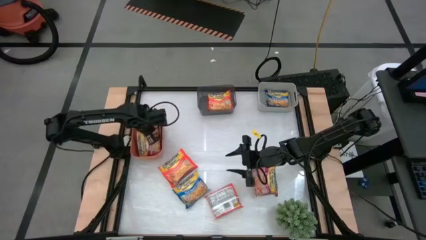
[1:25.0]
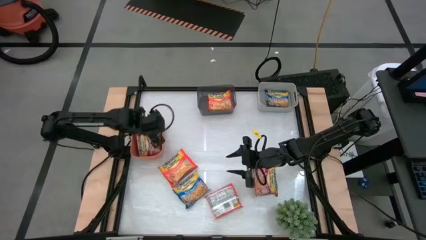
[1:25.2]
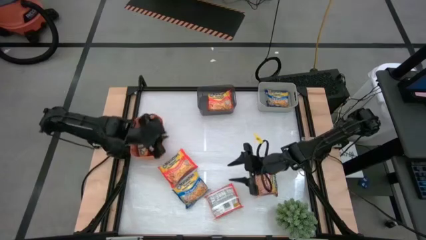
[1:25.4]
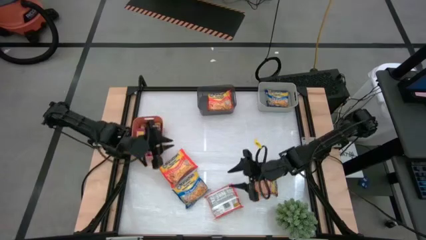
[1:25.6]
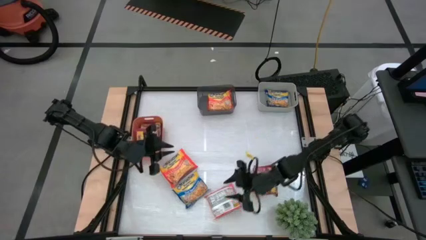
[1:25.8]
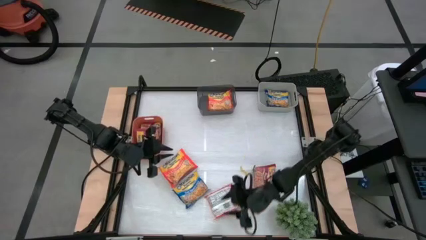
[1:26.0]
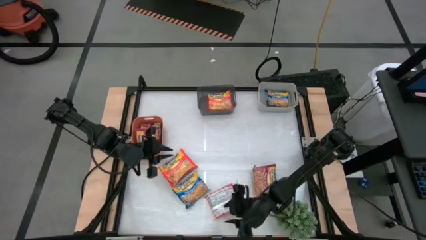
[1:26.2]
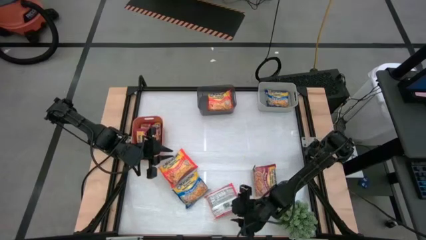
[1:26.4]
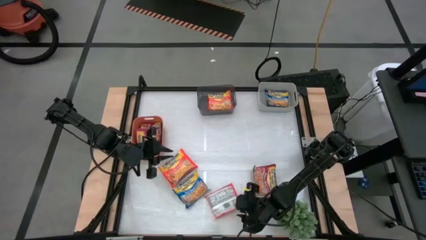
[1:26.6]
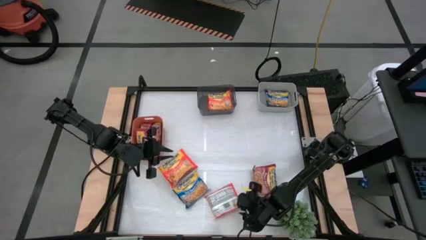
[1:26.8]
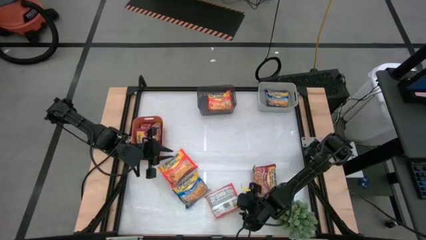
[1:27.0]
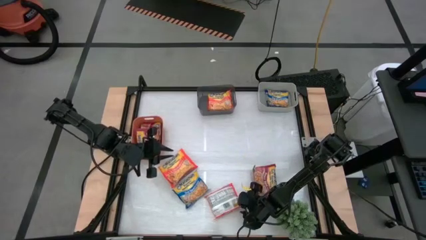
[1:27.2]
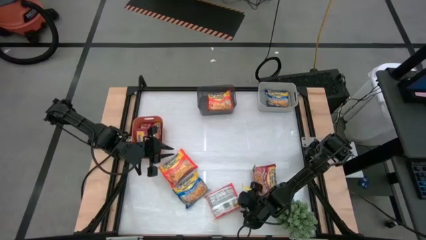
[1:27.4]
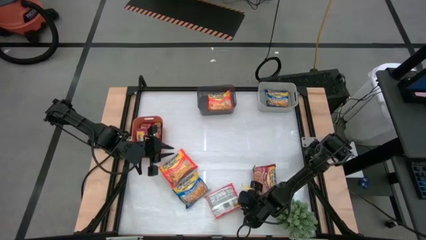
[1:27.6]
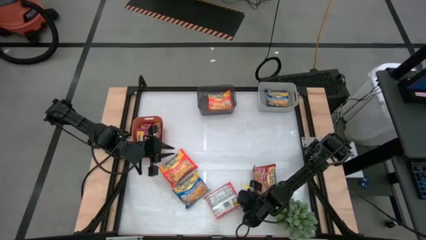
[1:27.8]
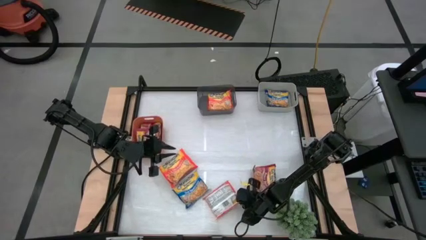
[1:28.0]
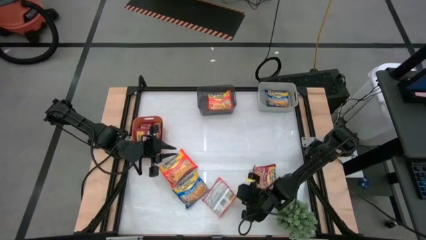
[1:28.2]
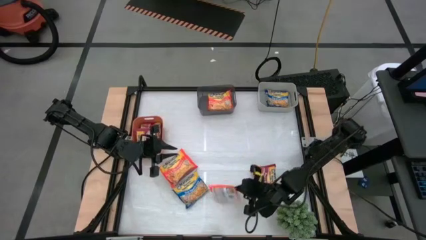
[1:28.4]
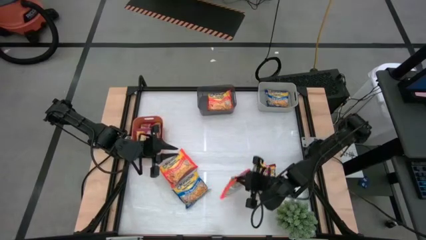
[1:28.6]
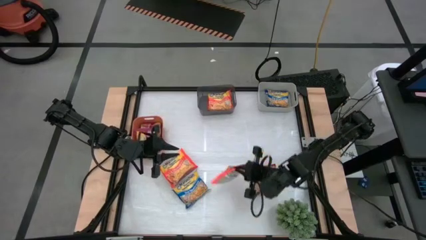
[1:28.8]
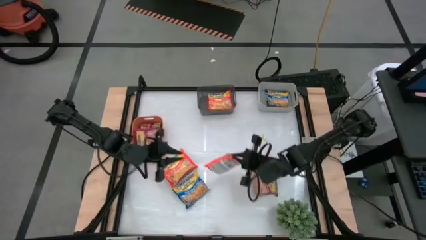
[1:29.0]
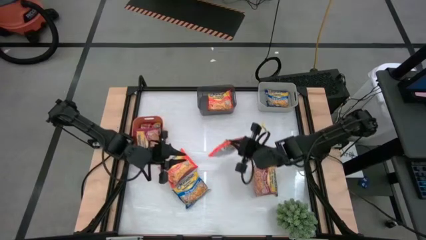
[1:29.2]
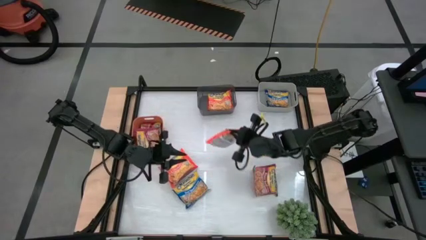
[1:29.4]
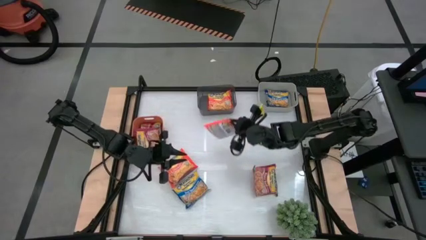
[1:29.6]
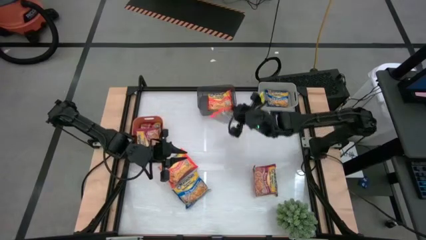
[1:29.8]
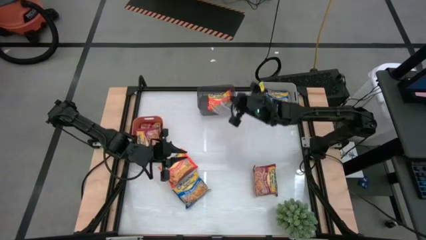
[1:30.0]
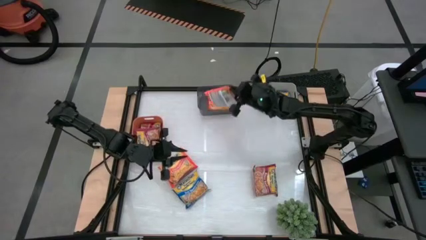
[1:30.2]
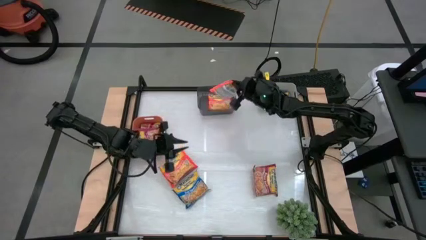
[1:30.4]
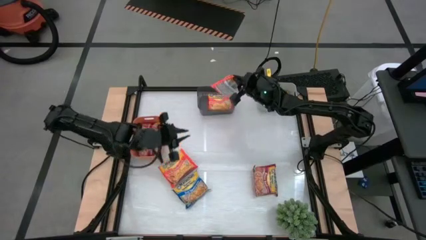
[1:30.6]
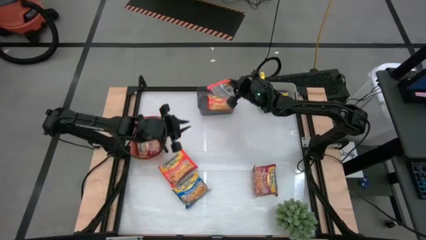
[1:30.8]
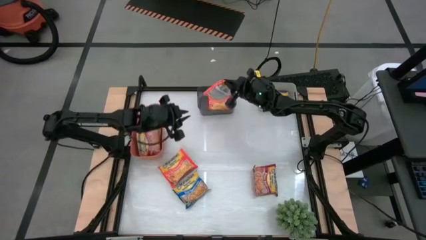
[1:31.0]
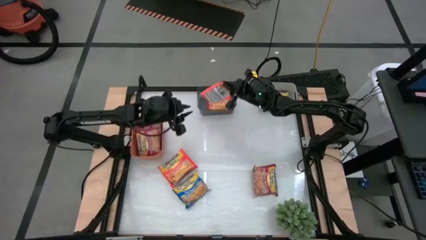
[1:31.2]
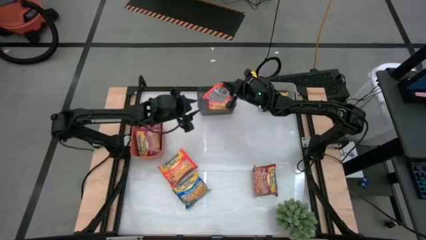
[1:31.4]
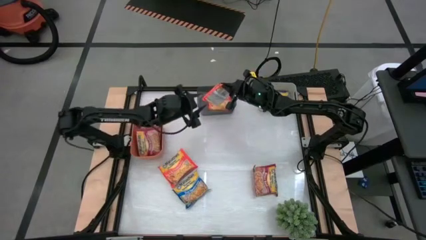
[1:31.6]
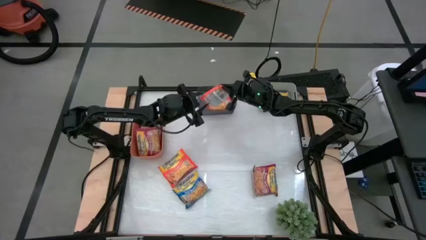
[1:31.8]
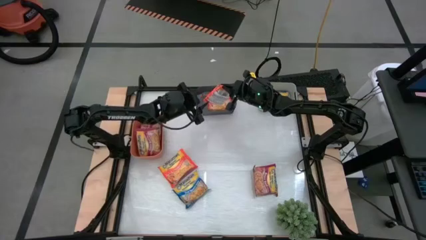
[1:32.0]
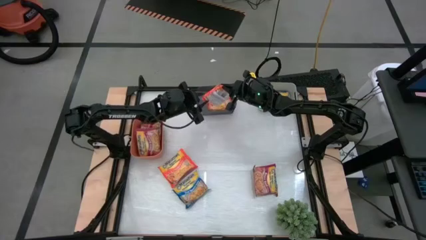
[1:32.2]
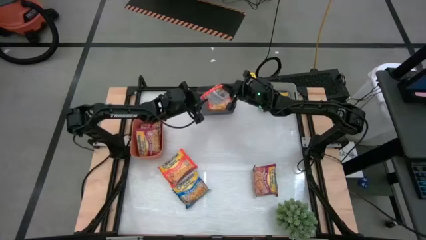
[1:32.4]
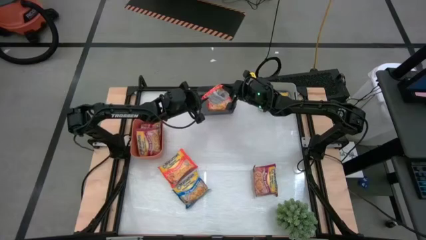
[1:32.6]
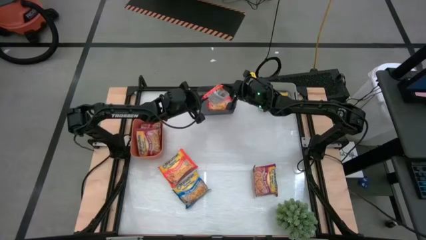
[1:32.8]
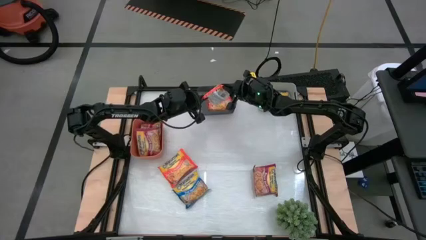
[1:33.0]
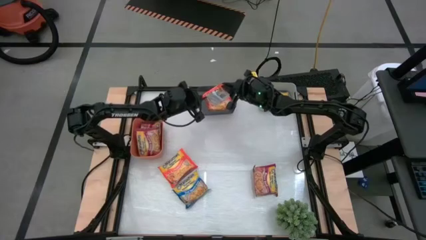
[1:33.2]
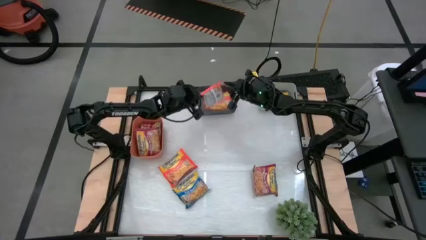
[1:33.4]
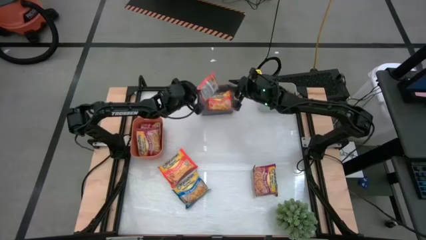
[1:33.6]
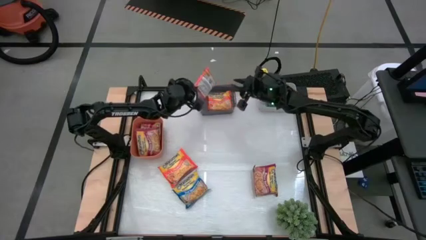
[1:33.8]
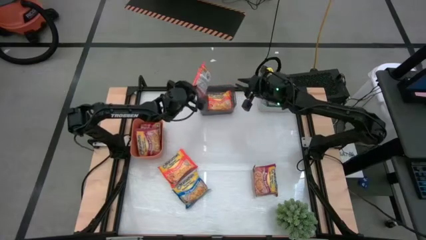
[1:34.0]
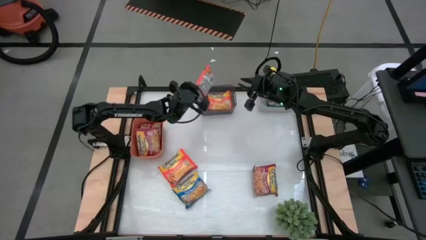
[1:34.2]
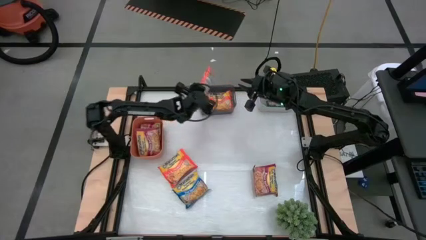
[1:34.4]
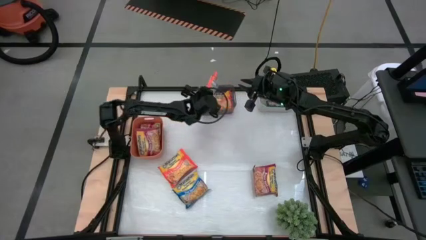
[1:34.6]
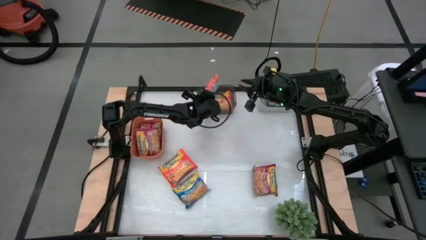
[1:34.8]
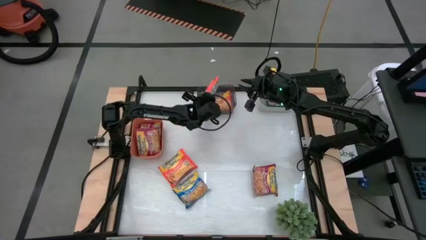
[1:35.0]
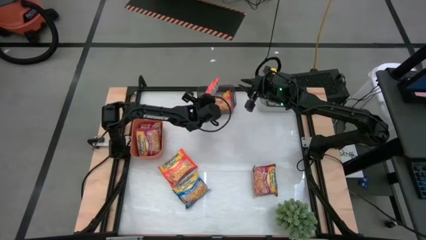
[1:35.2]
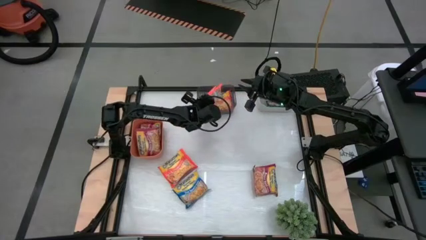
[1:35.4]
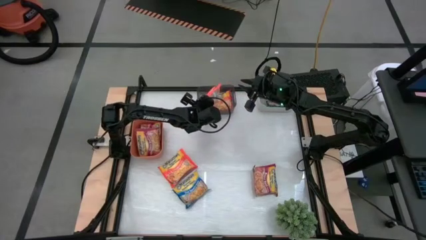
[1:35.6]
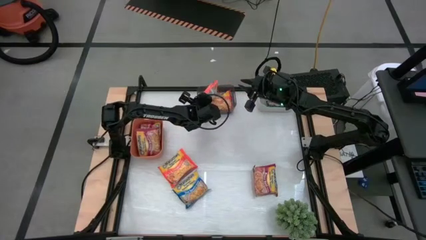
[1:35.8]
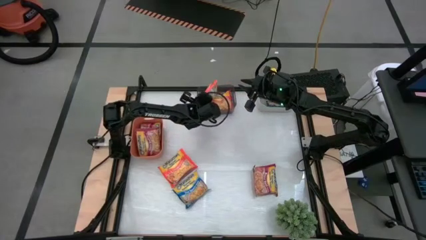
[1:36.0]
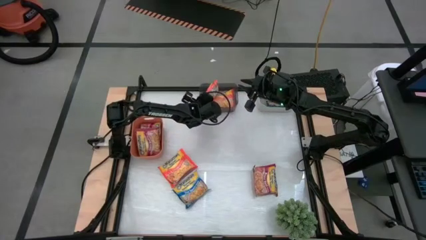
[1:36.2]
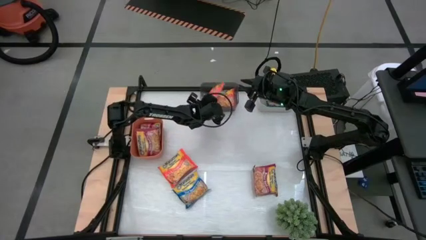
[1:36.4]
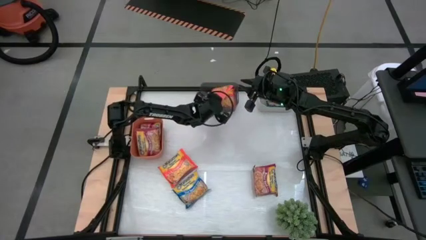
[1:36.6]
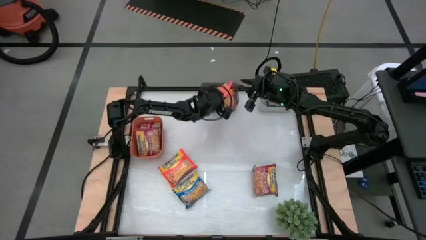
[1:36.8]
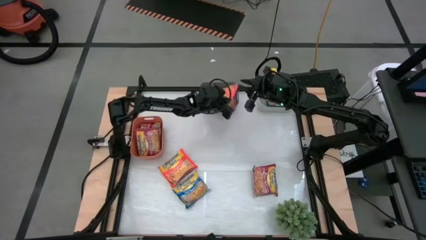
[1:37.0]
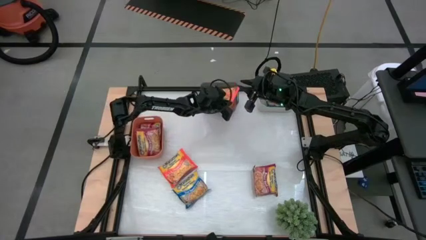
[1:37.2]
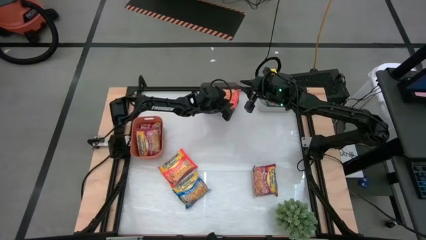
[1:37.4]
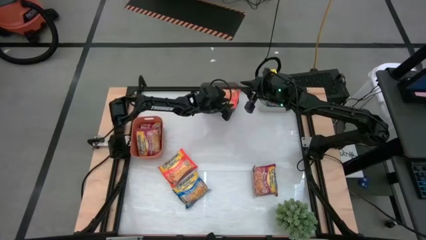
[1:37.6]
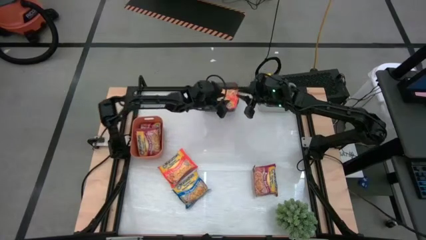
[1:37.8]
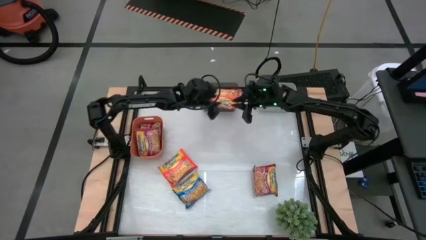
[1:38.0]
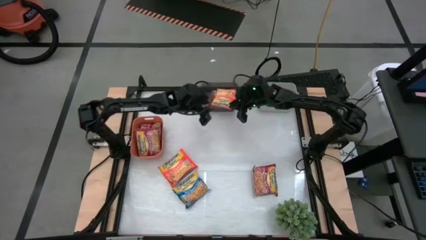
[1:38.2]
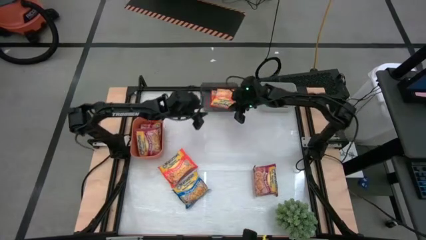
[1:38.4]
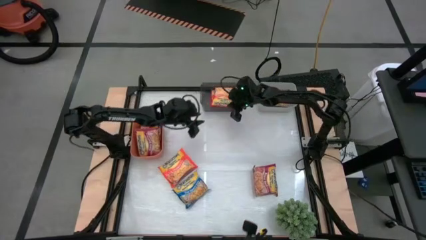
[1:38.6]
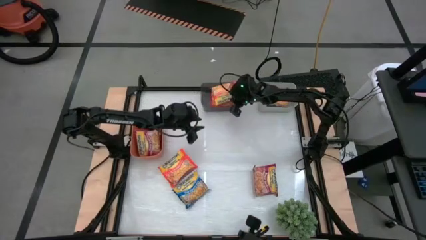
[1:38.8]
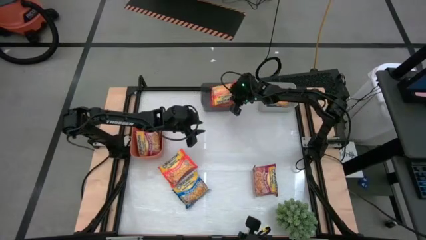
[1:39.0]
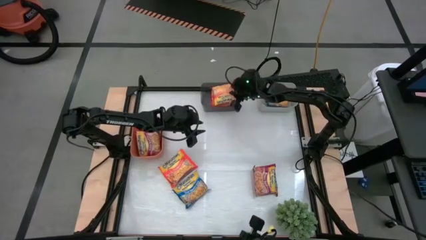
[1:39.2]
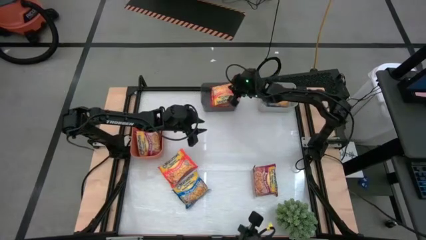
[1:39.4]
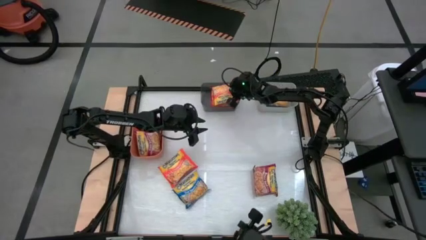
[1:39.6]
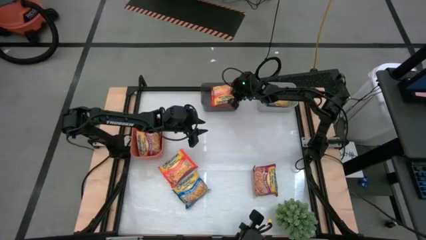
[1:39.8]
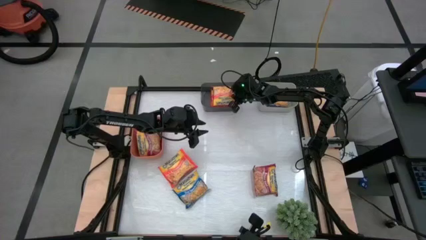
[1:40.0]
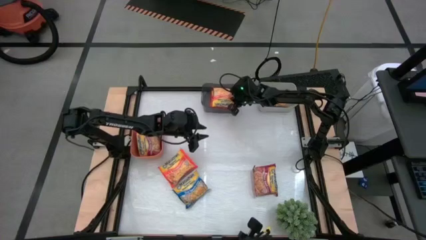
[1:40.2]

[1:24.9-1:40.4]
Task: Sort Maruchan noodles
Put the right orange noodle pack into the black bin

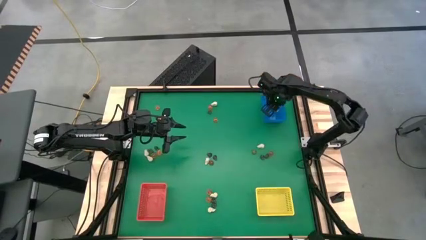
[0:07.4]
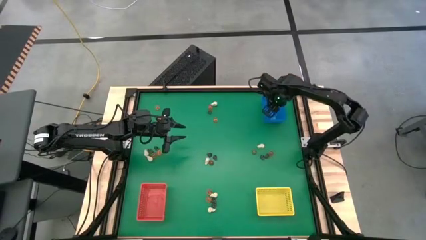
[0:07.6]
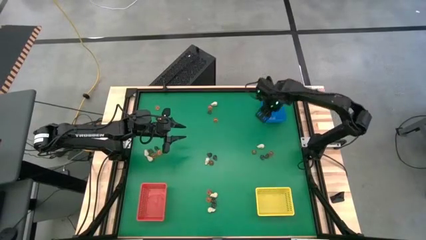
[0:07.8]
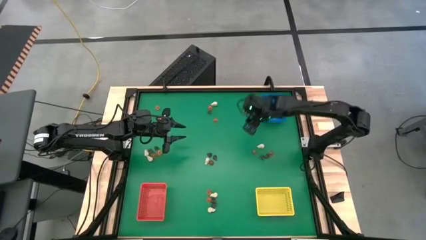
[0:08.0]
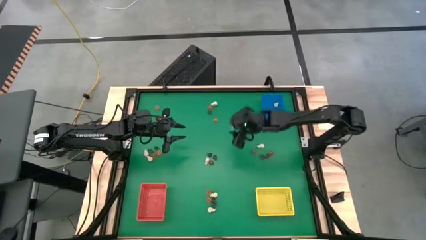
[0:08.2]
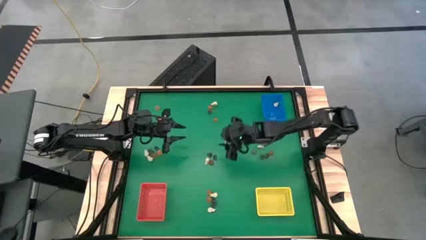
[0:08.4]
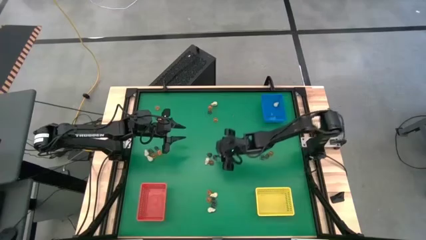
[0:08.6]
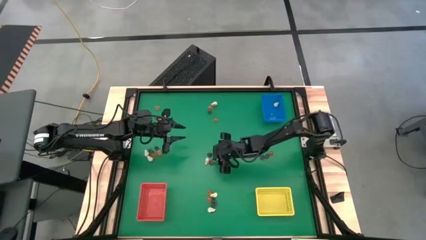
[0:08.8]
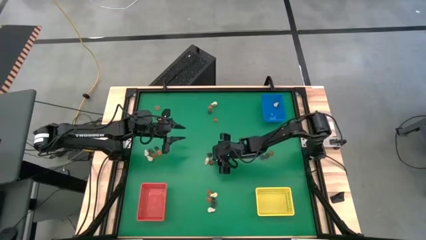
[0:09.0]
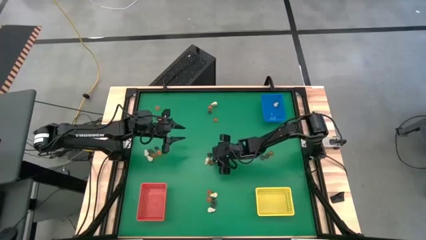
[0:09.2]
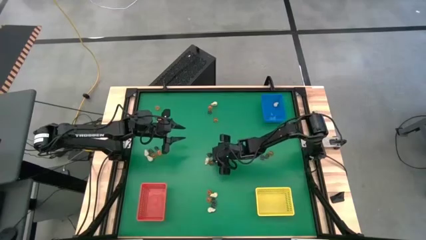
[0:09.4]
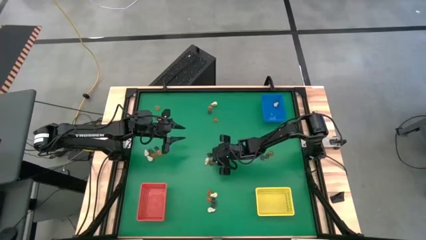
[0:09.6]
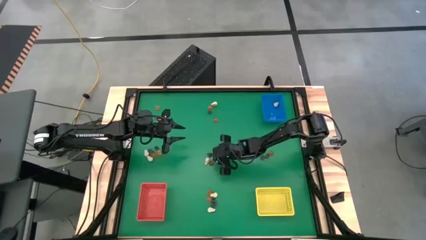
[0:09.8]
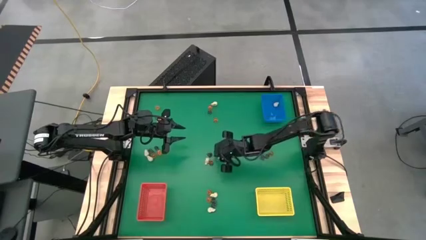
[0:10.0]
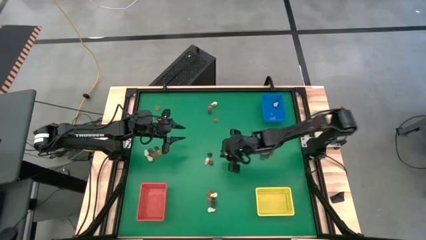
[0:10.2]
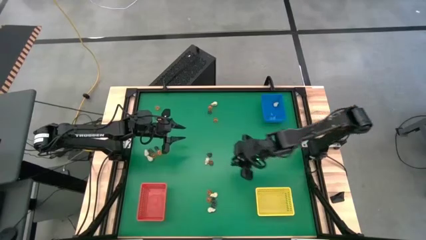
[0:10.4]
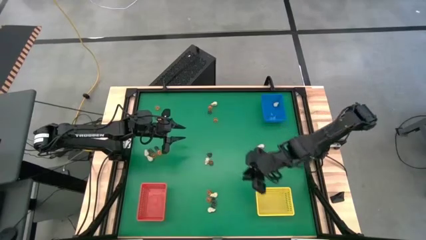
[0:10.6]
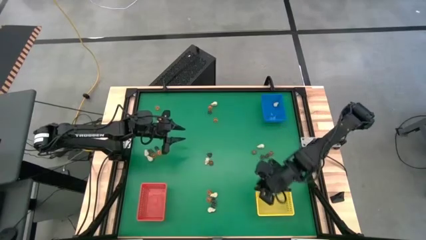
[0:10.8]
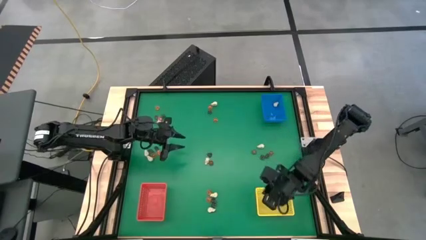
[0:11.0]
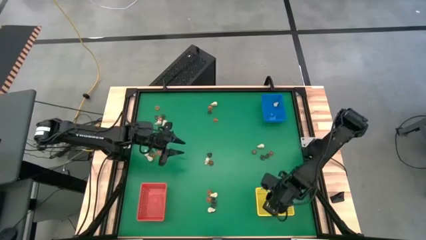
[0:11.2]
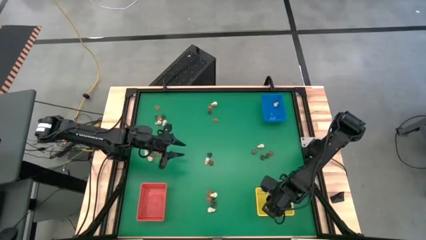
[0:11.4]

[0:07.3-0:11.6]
Task: Sort Halloween decoration
Put the black skull toy into the yellow bin
